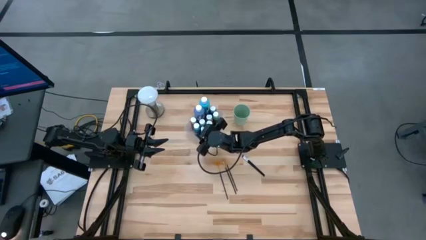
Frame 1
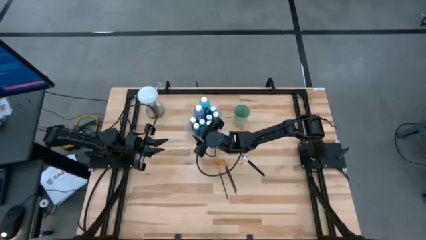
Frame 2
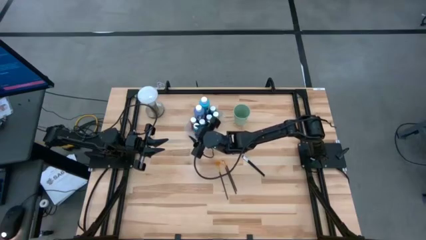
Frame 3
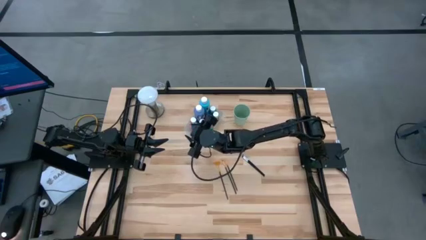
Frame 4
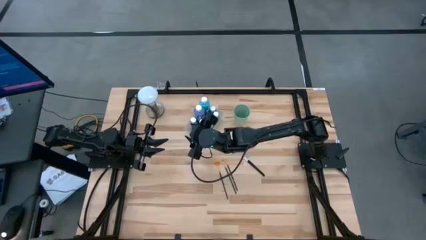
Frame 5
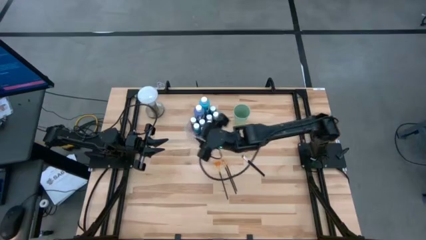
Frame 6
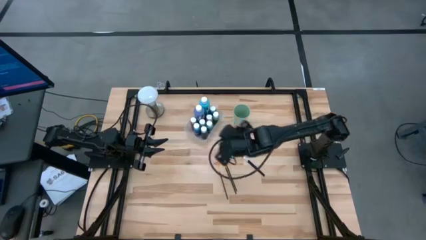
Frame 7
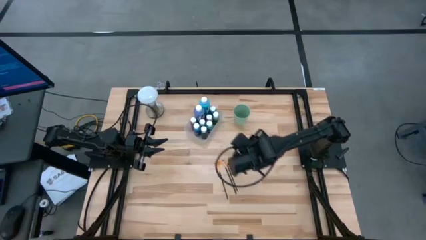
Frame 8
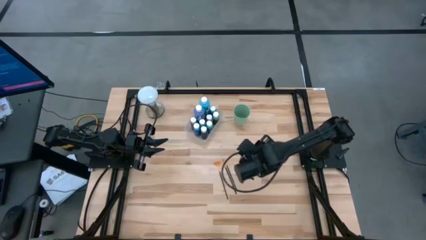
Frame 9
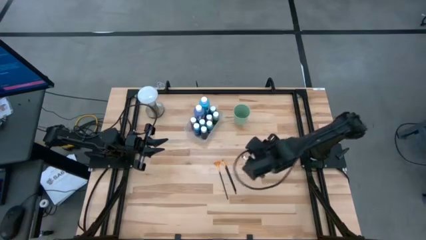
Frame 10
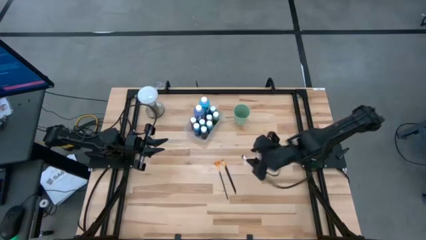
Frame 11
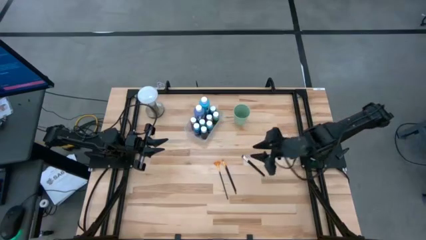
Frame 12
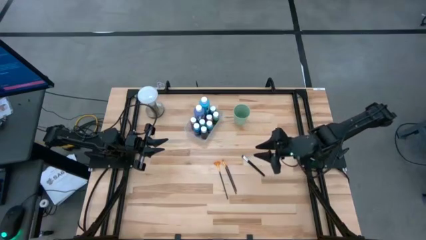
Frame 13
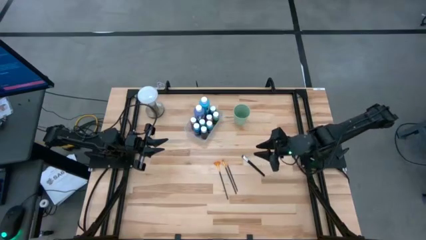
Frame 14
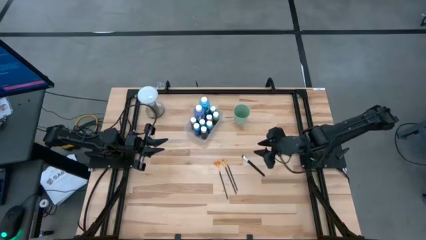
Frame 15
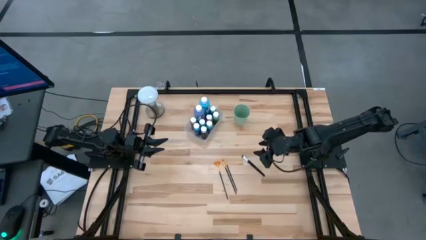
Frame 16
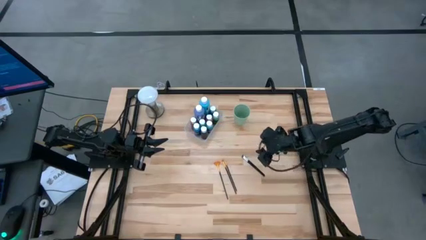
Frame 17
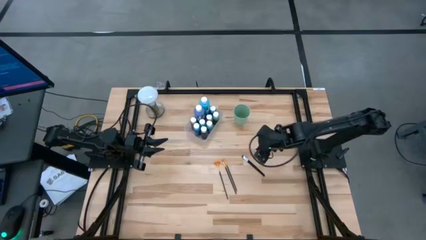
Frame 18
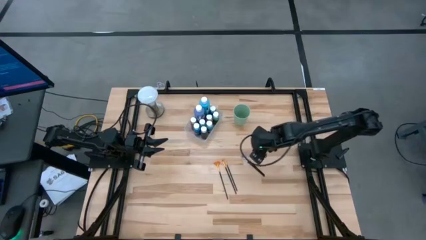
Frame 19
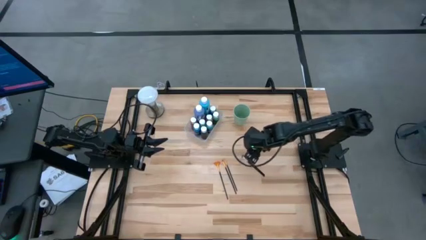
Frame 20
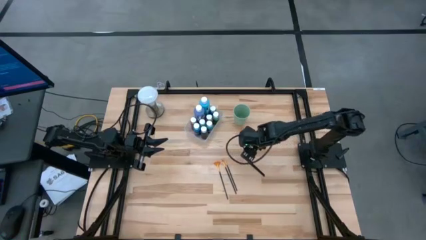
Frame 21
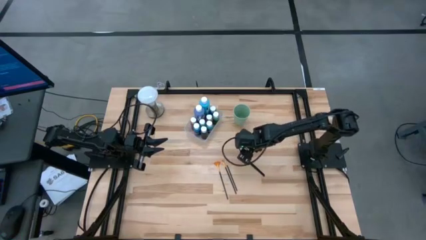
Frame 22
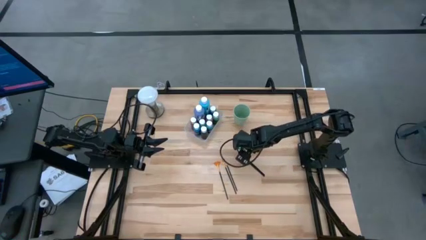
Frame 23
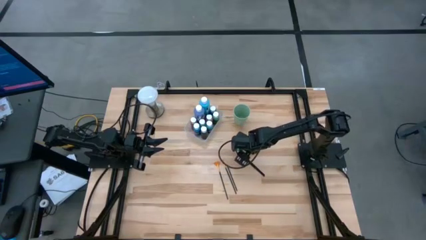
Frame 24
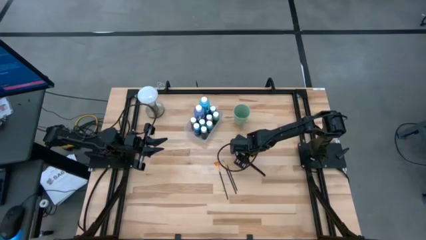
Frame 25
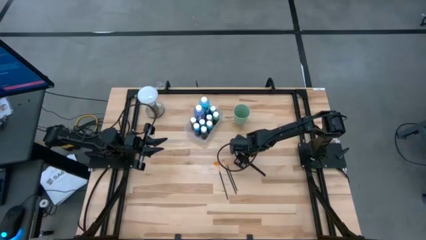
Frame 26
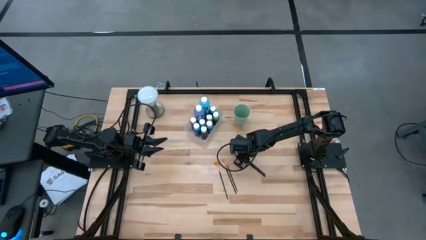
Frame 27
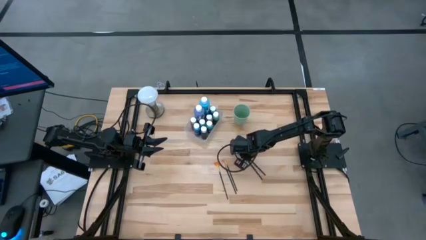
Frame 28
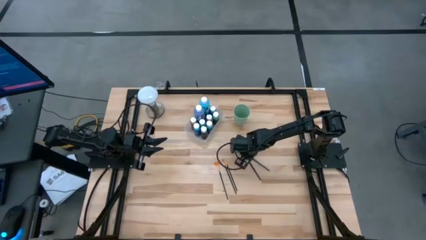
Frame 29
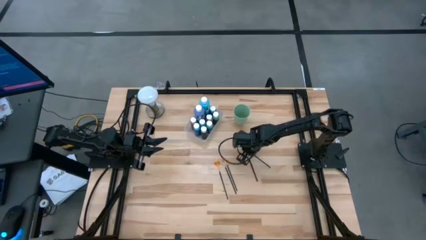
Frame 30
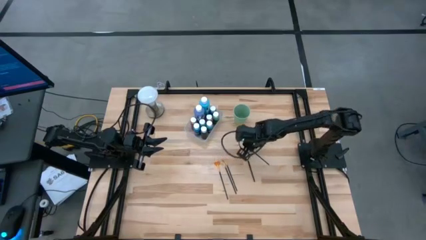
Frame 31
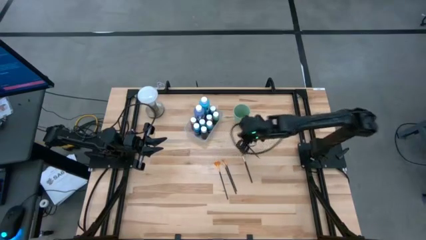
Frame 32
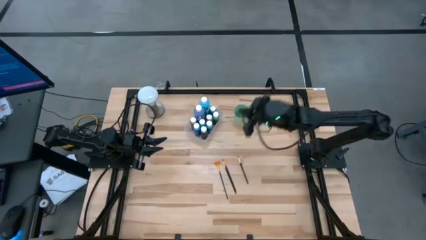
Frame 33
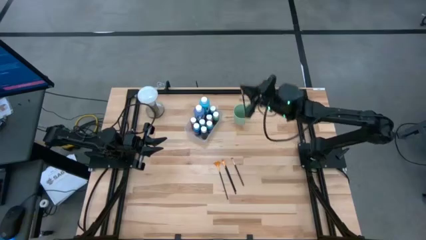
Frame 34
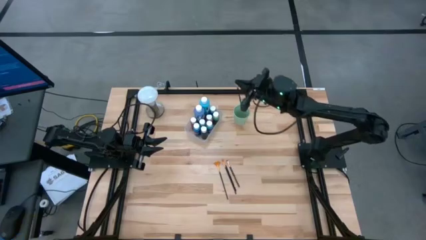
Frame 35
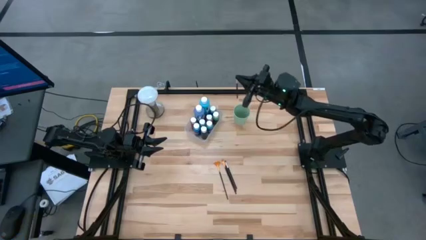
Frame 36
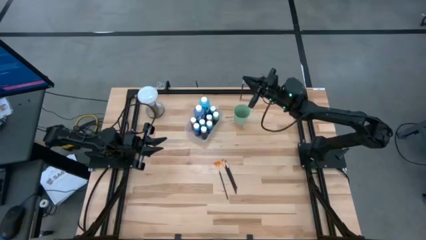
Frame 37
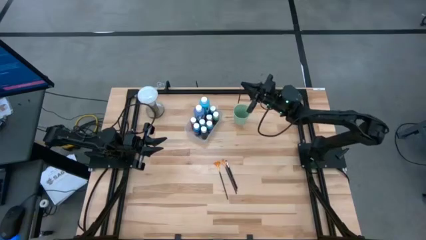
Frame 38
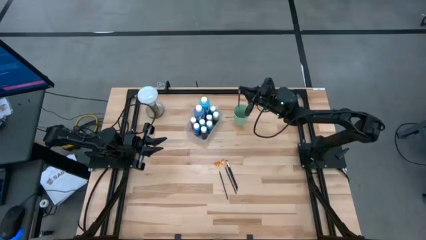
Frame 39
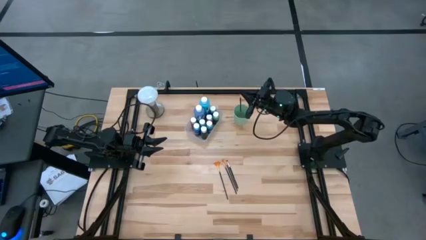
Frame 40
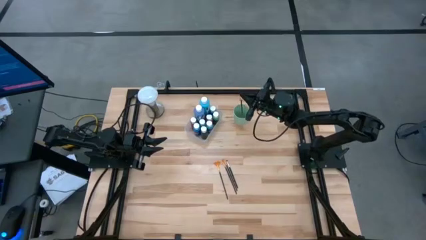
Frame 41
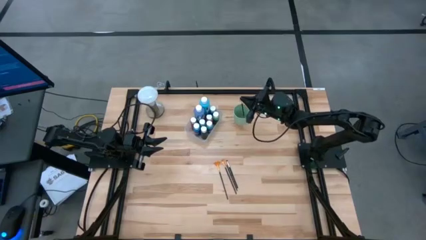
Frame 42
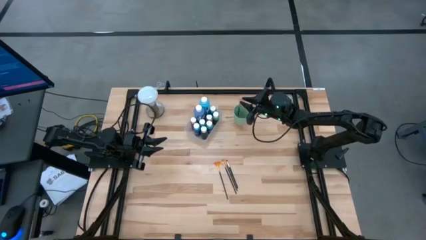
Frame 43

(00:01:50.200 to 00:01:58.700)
Task: Pick & Place Paint Supplies
Put the right black paint brush into the green cup

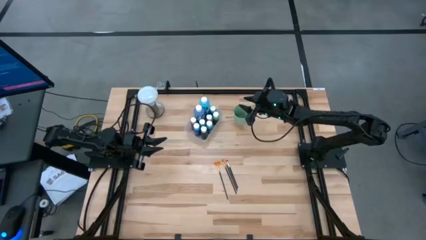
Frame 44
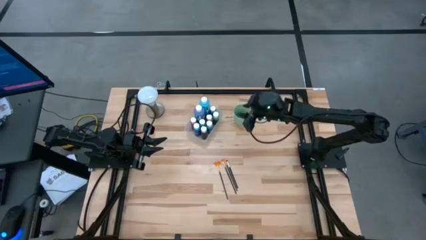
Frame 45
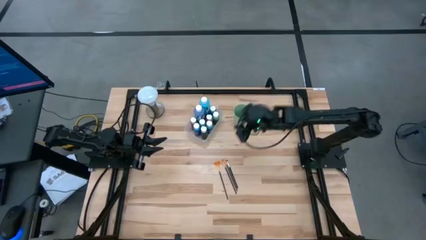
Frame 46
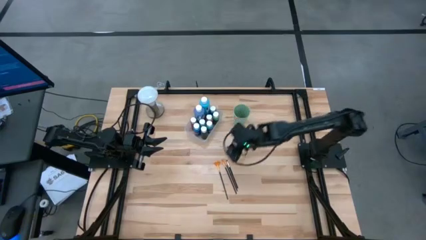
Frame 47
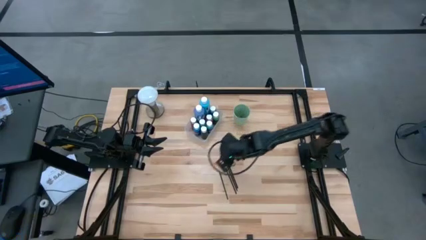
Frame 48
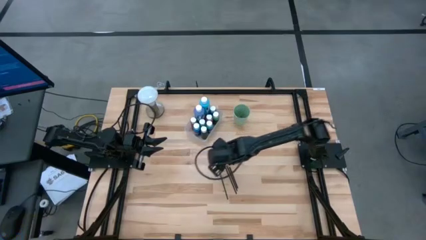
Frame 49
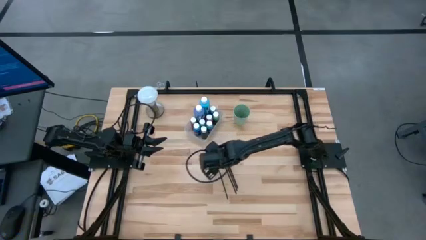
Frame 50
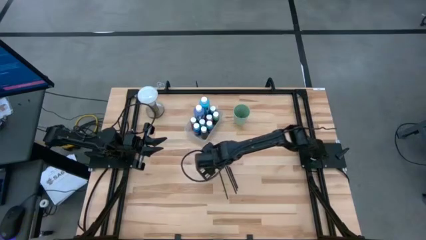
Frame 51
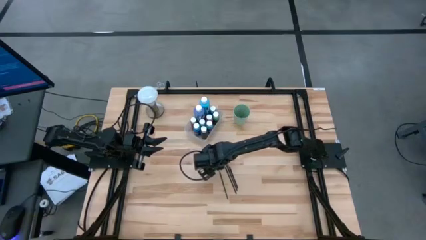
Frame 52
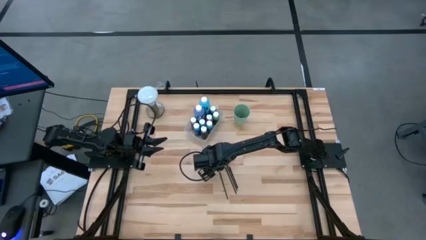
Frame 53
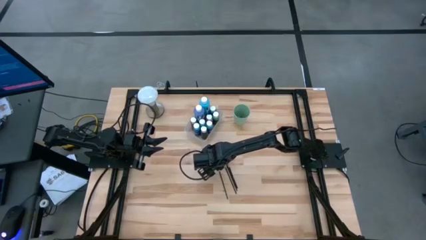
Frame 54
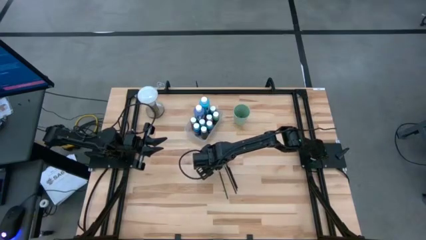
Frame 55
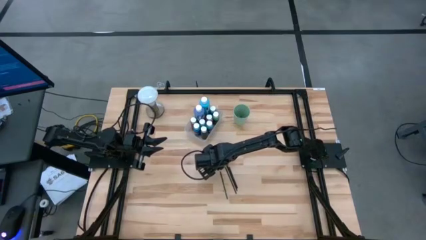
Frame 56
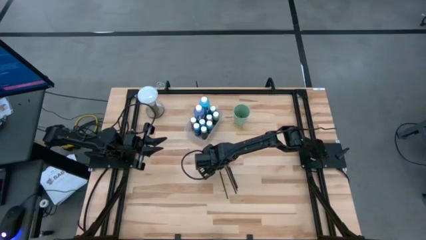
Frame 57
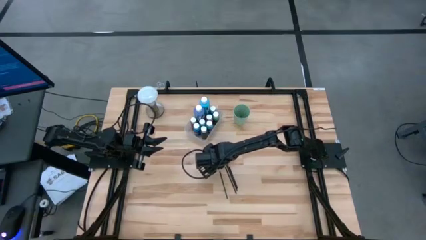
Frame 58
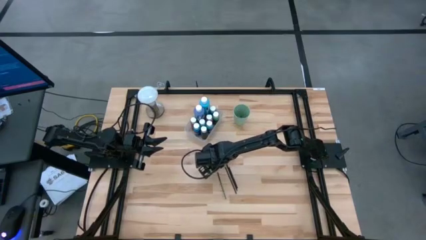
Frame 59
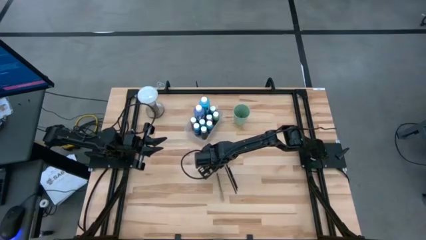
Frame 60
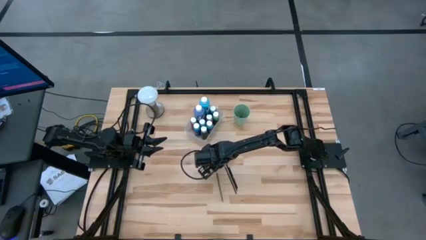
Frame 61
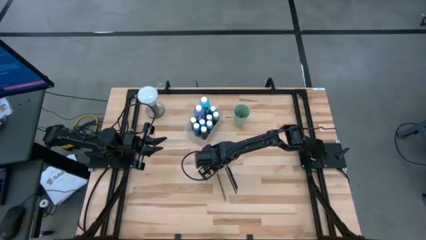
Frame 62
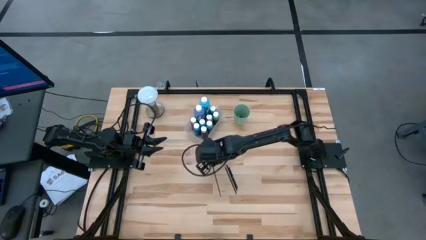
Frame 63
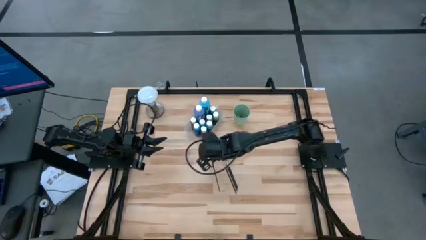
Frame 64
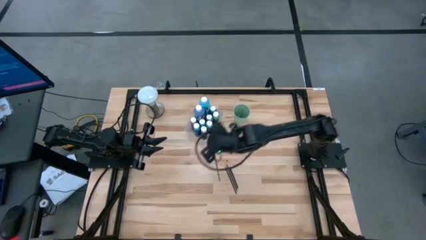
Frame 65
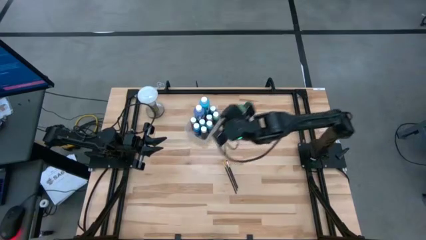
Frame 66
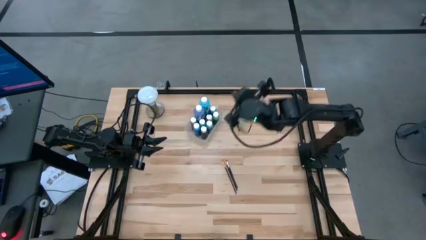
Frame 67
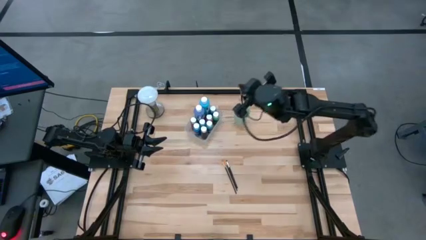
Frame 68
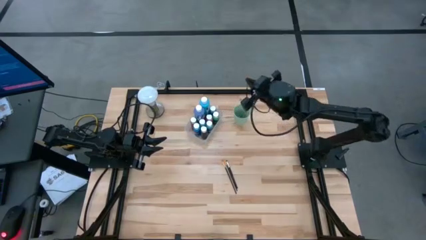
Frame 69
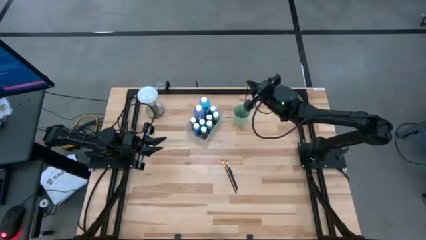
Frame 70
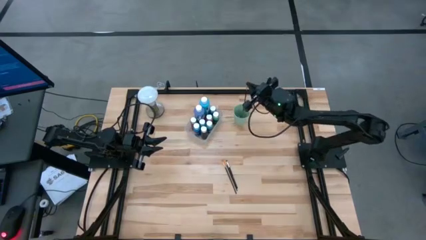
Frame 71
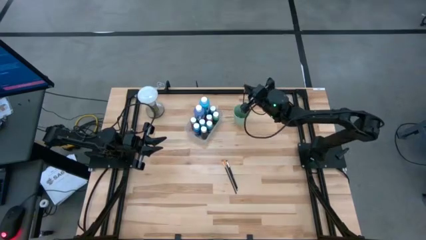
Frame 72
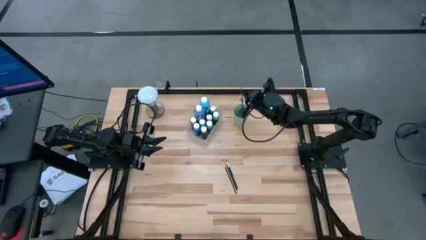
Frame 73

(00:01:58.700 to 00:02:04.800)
Put the left orange paint brush into the green cup

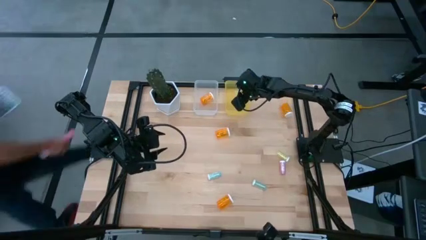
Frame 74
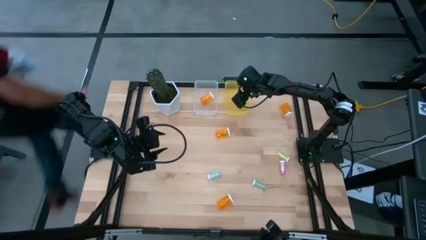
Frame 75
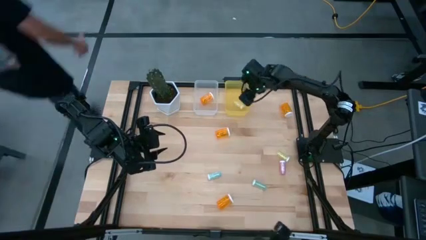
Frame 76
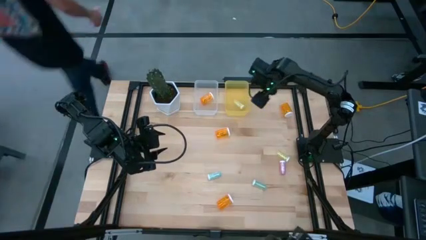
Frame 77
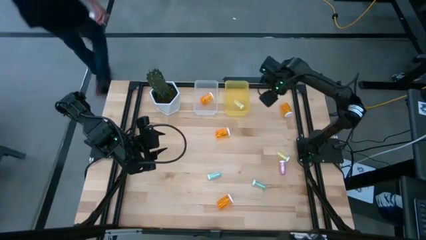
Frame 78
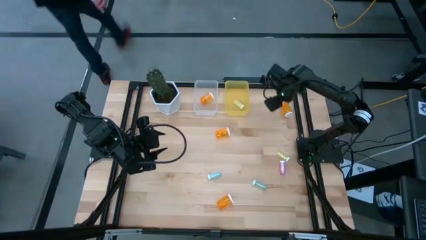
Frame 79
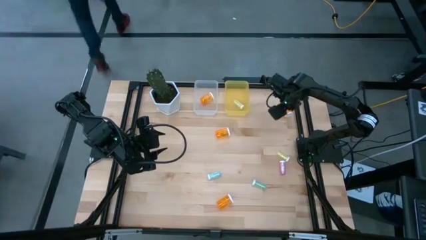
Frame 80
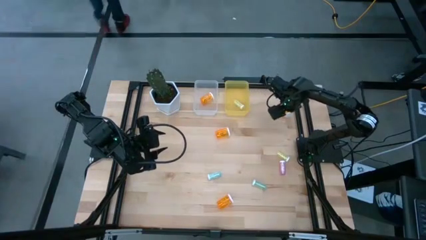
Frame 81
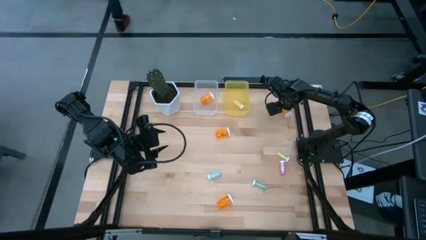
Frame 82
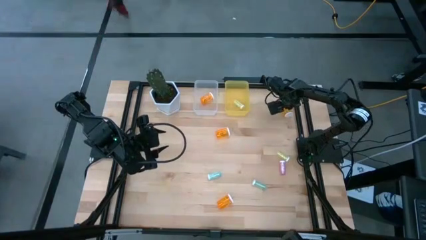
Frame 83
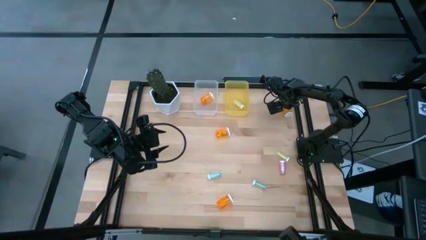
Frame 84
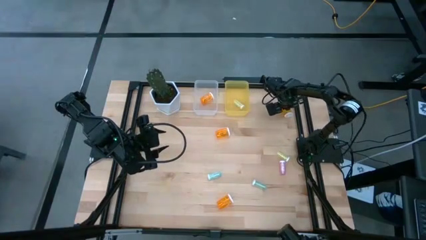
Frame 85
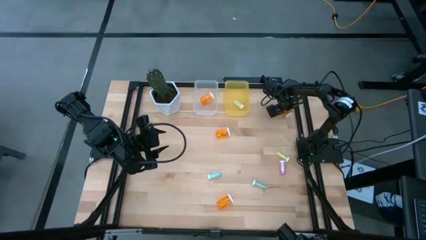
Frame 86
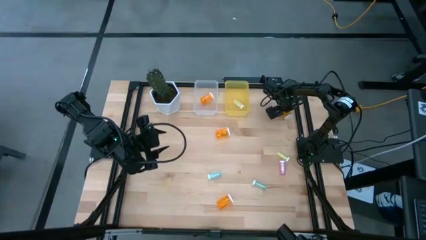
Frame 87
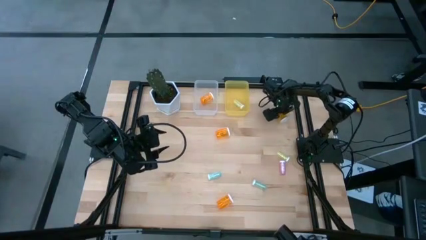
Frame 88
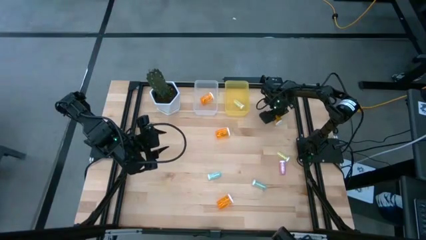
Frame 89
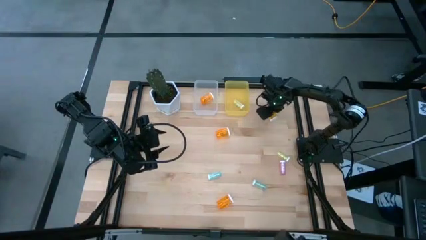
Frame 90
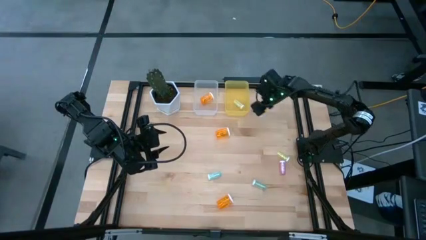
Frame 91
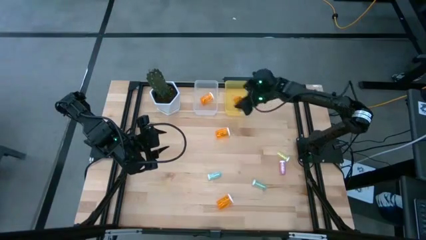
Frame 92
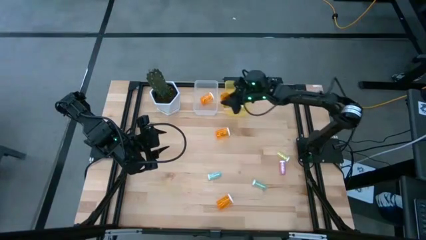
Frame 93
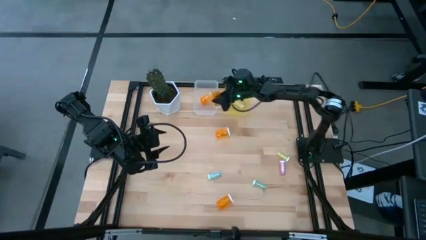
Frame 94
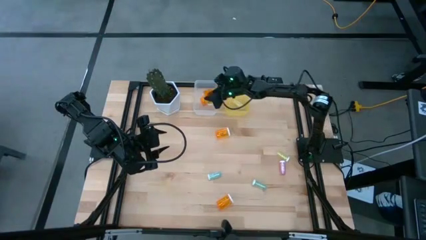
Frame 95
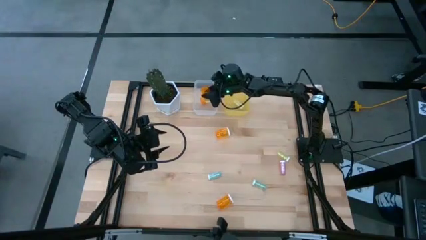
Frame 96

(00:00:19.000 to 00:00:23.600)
Task: Pick and place medicine bottles into bin by pill shape (circle, oval)
Put the top right orange pill bottle into the white bin
